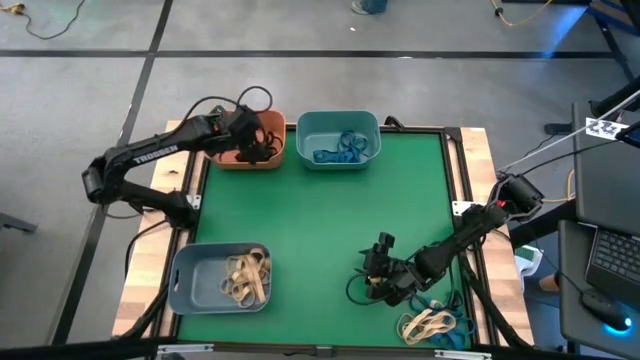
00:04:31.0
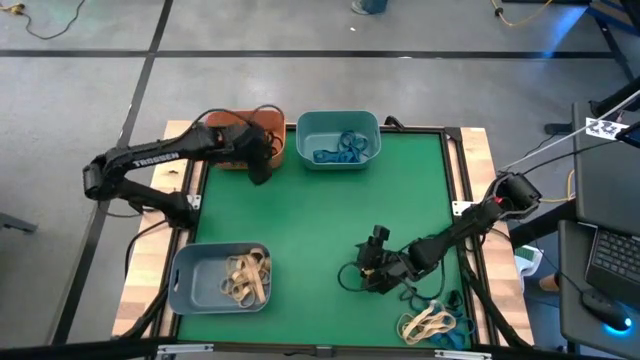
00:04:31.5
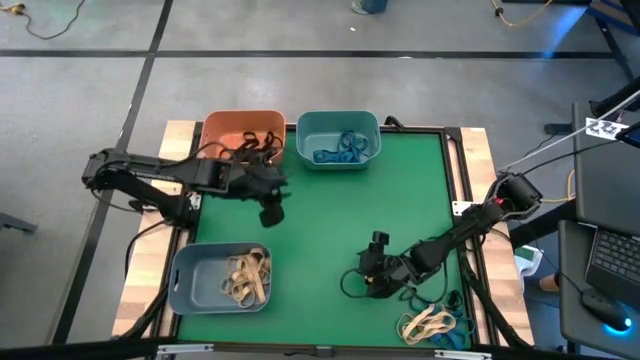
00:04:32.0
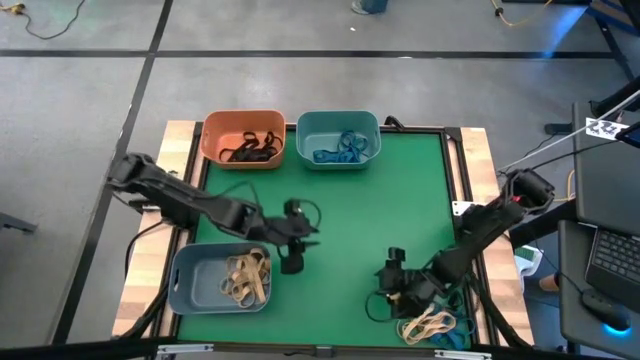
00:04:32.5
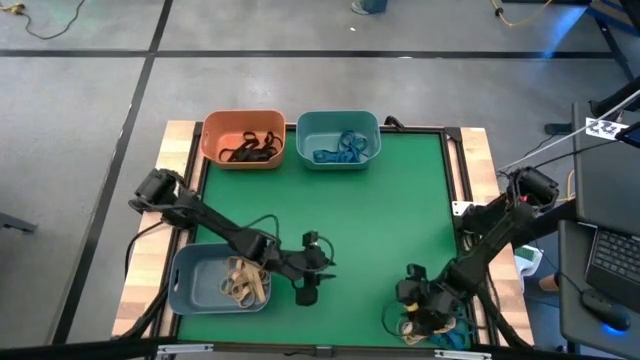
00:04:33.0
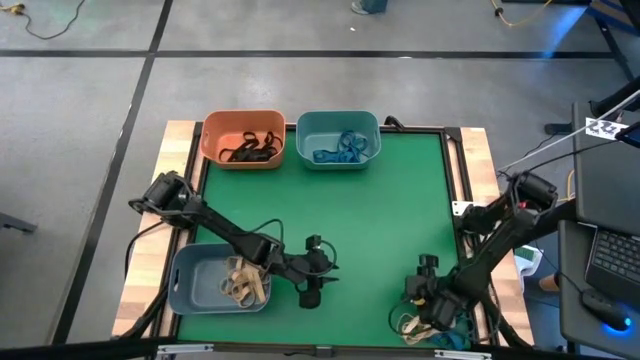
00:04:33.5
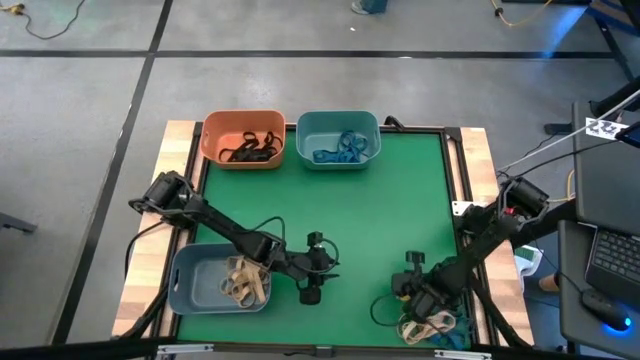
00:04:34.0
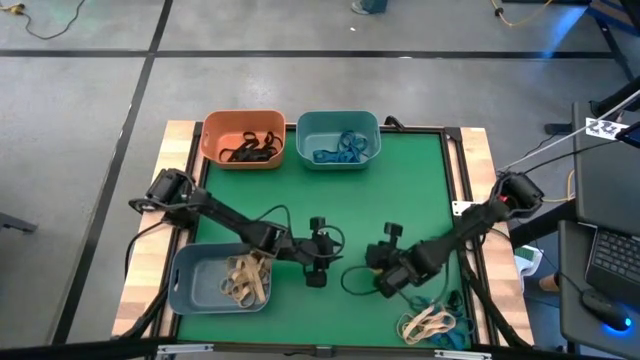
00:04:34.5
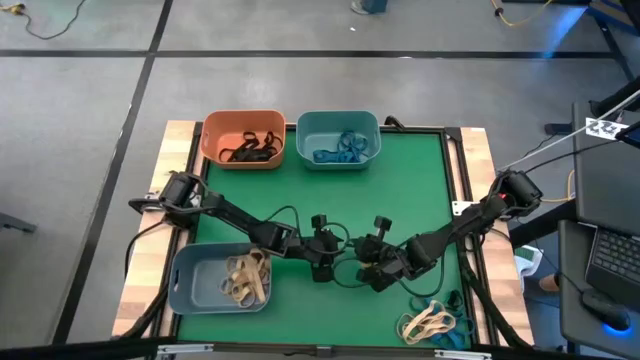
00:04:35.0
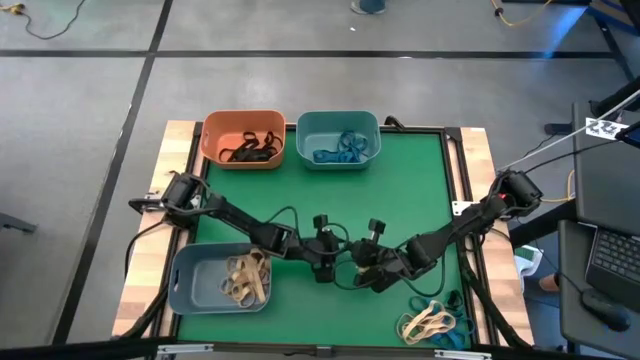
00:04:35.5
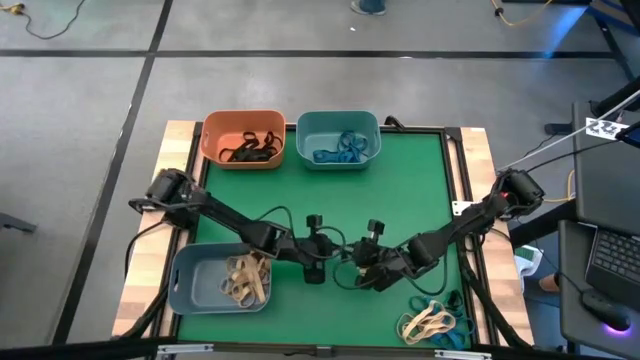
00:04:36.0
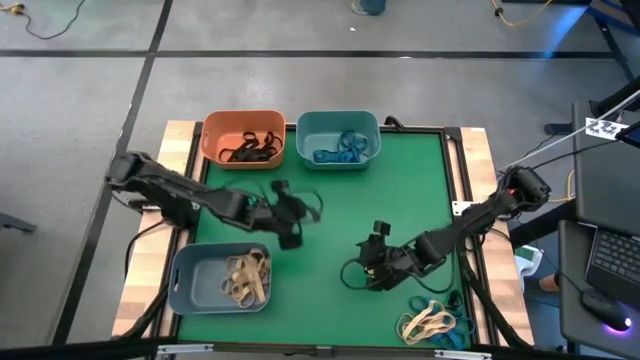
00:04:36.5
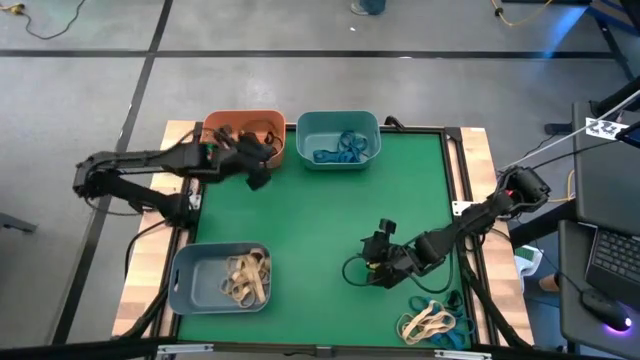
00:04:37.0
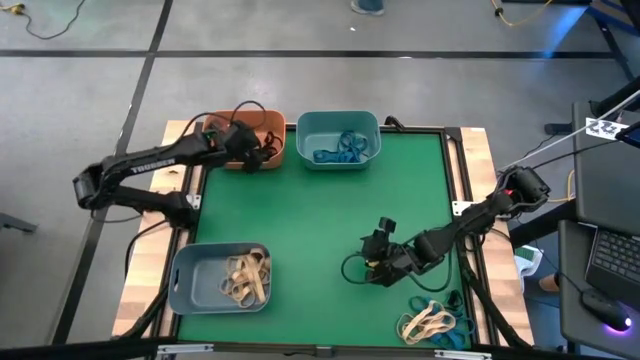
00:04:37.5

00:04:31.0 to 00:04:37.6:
Task: Sort rubber bands into baskets
Put the small black rubber band into the orange bin

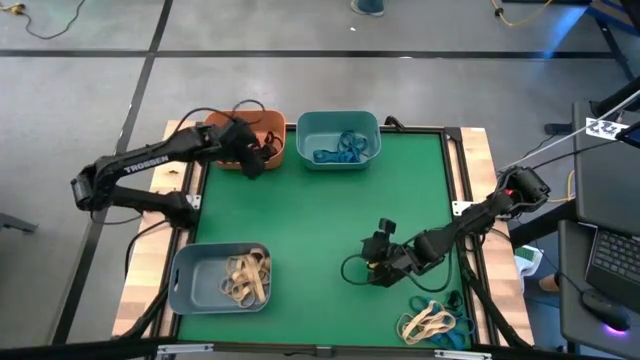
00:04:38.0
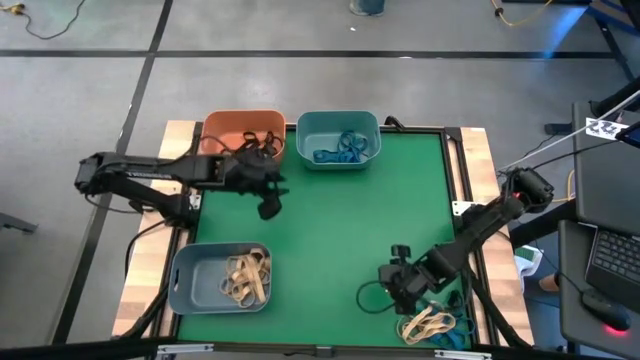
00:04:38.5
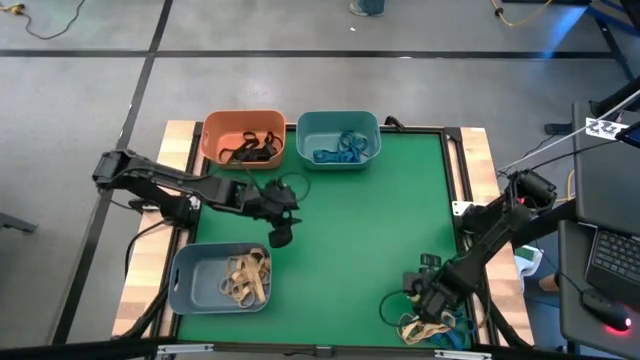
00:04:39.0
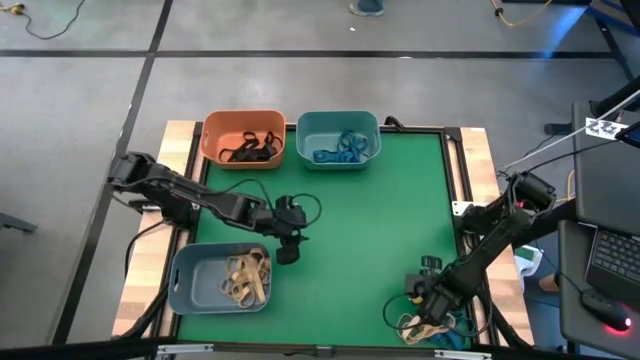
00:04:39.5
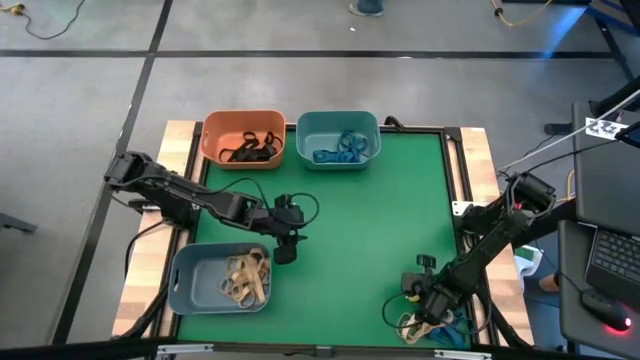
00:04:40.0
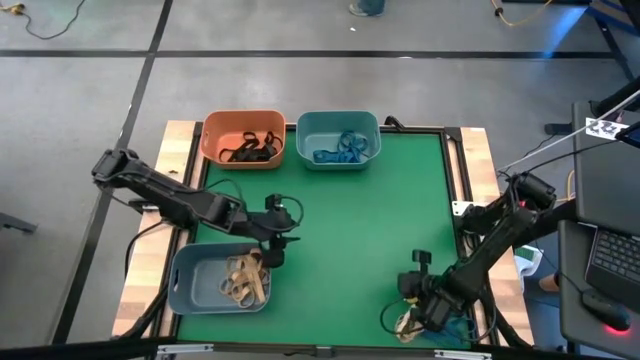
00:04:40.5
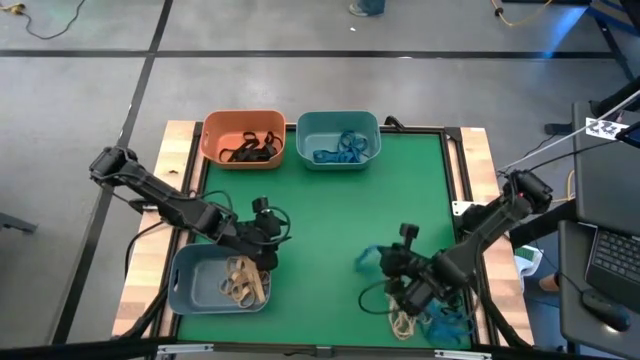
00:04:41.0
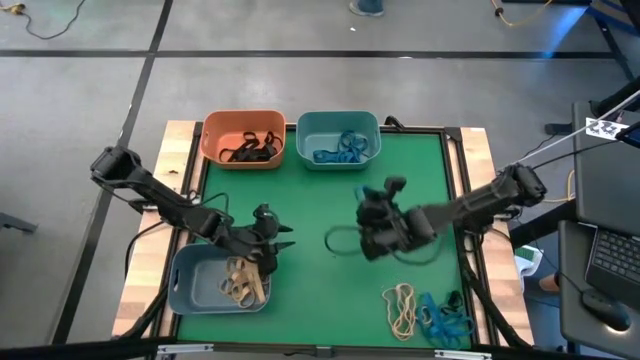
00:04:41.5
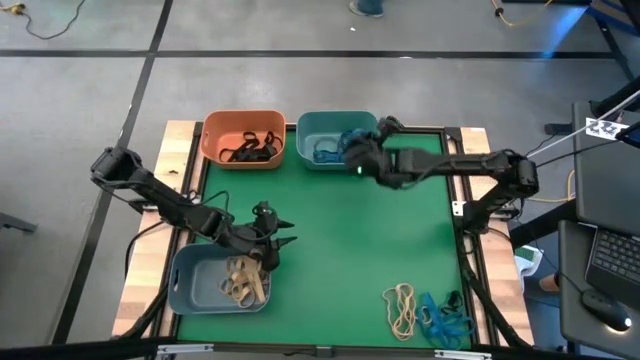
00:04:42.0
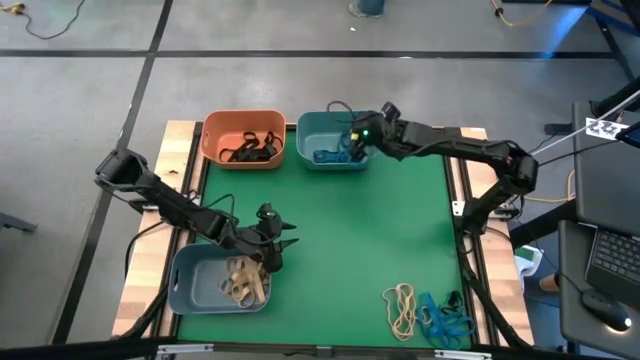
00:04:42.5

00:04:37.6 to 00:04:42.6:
Put the blue rubber band into the green bin

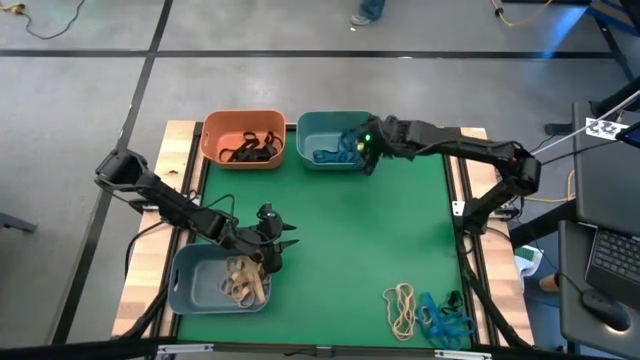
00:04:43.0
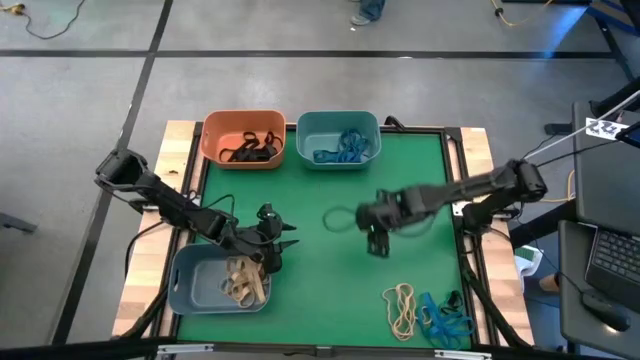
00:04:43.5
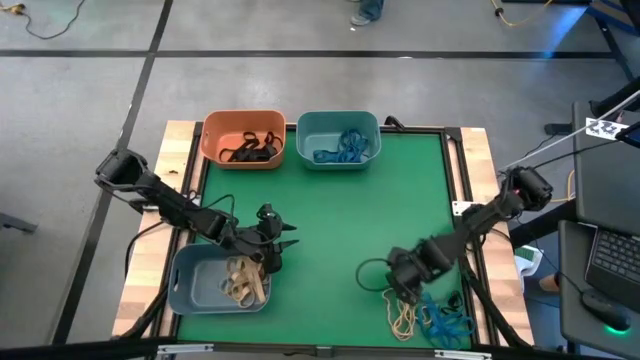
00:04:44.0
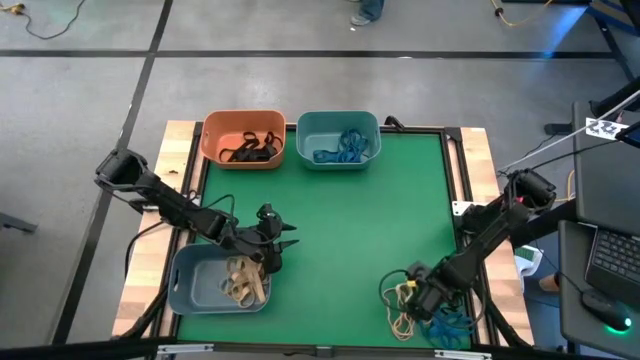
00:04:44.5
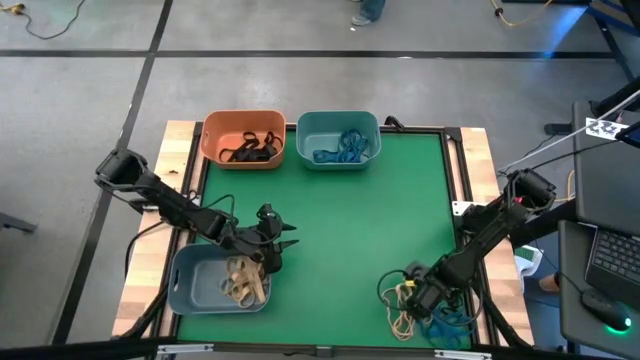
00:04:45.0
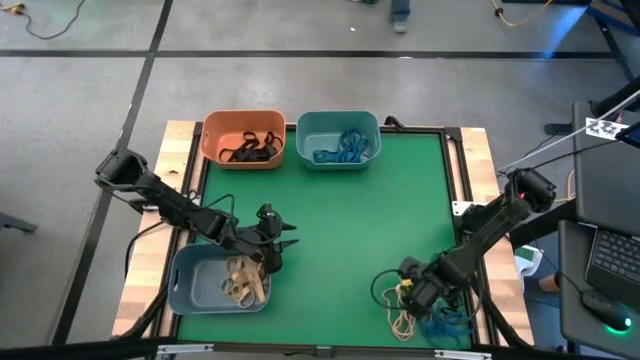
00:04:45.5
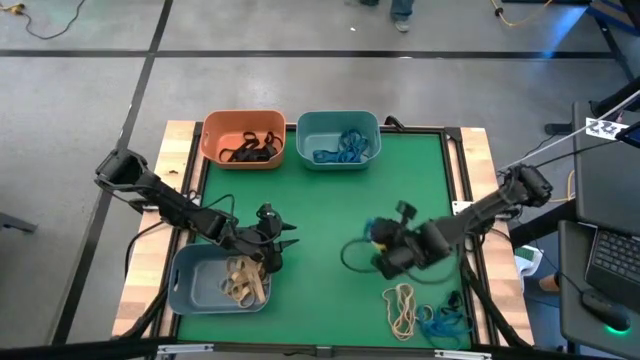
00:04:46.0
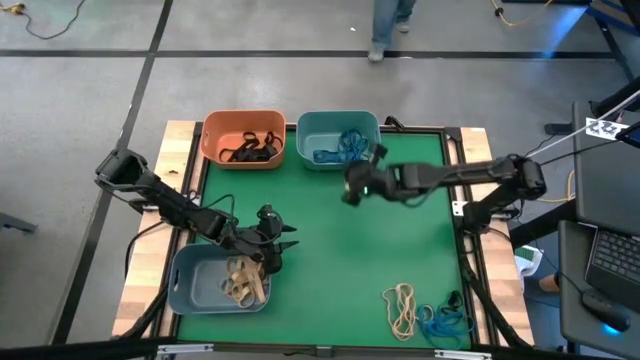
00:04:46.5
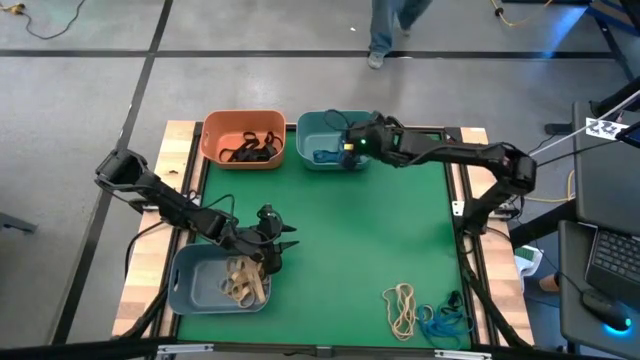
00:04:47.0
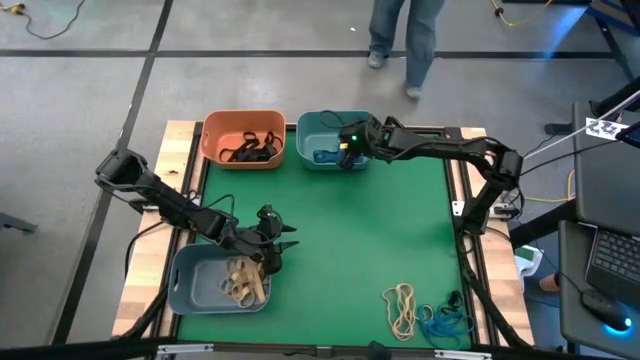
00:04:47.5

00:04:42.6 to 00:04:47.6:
Put the blue rubber band into the green bin

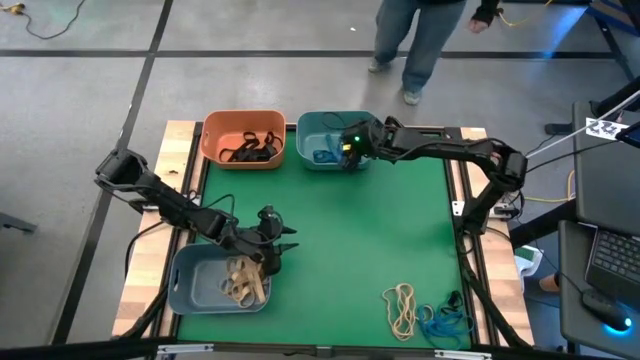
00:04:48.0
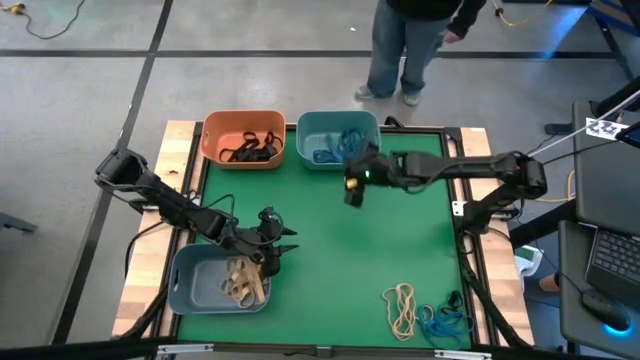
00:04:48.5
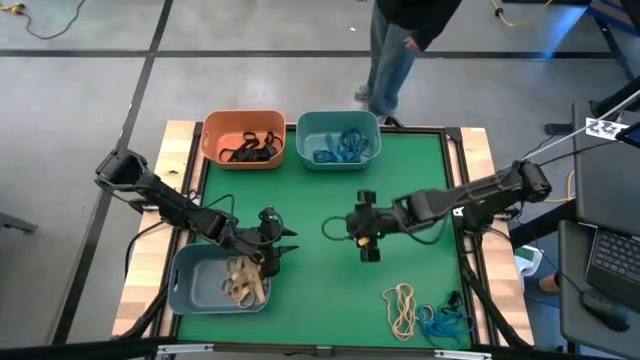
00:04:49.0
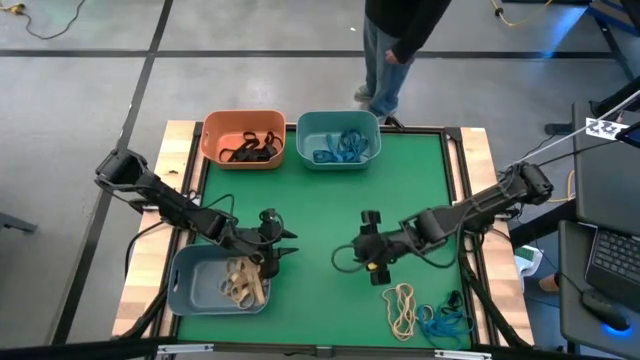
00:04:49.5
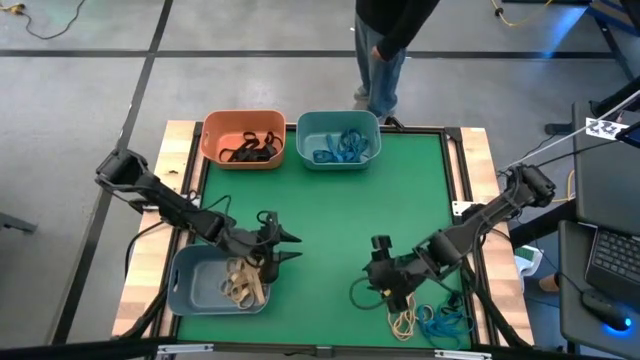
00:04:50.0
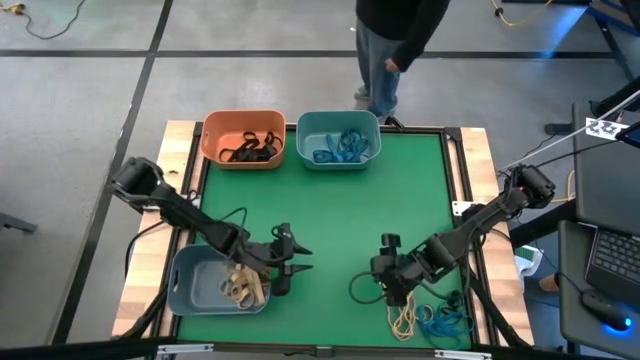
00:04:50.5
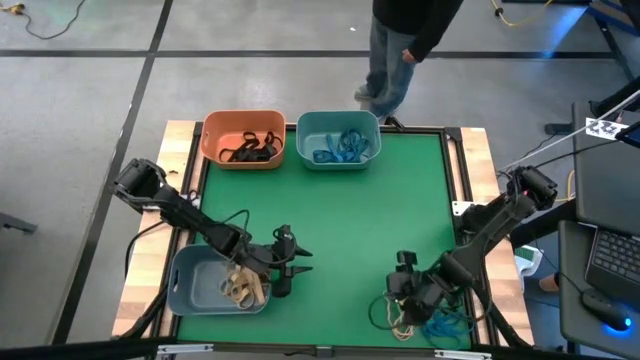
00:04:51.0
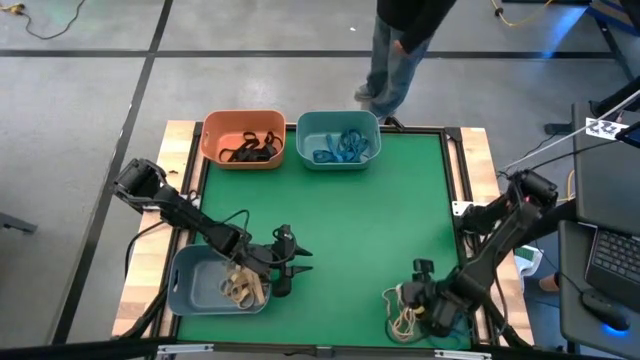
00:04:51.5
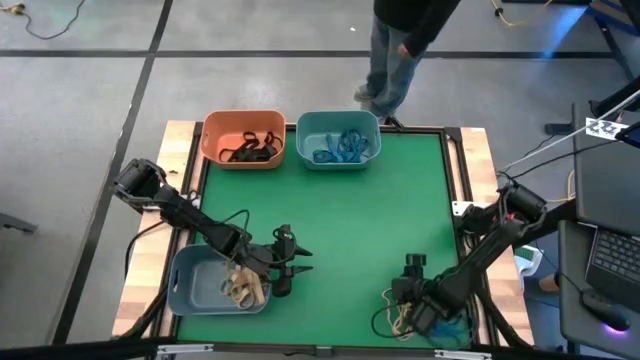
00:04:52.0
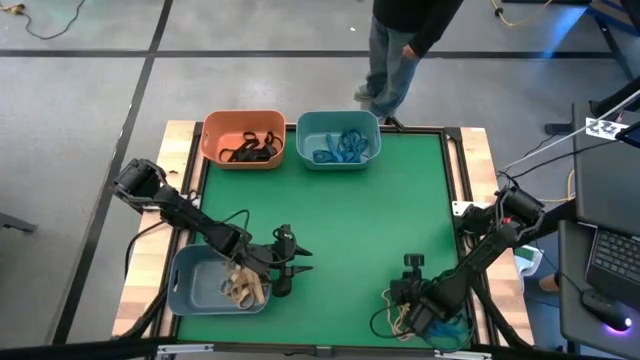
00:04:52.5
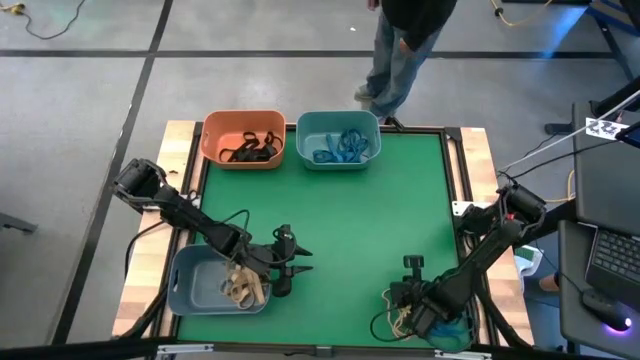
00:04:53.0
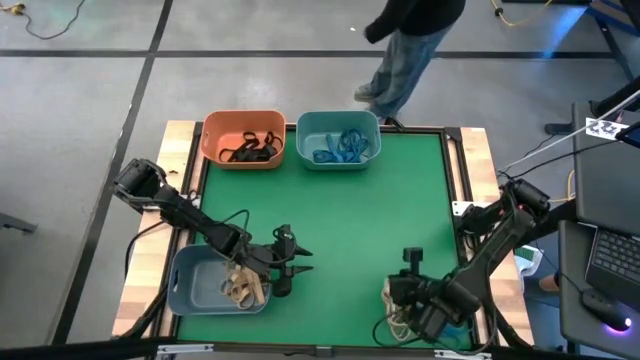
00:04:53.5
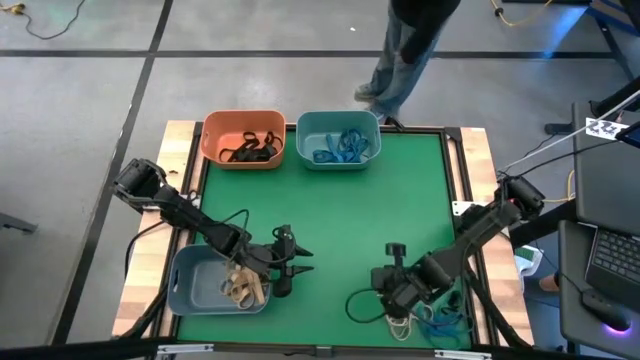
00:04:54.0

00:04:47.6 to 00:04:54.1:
Put the orange rubber band into the blue bin
